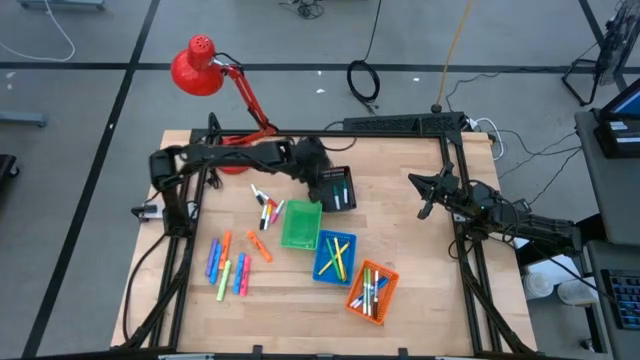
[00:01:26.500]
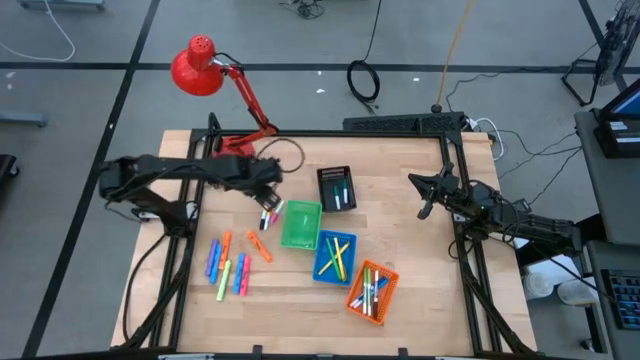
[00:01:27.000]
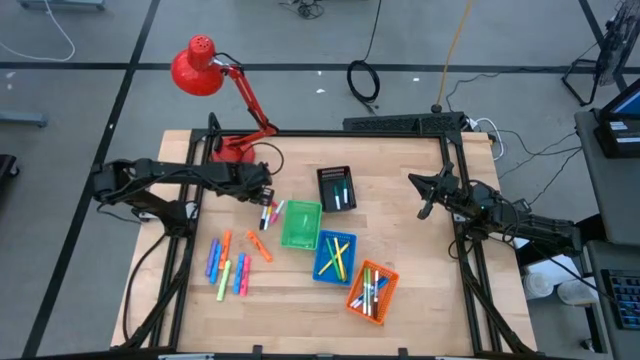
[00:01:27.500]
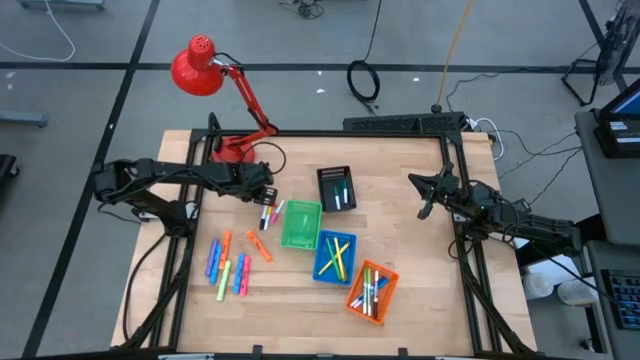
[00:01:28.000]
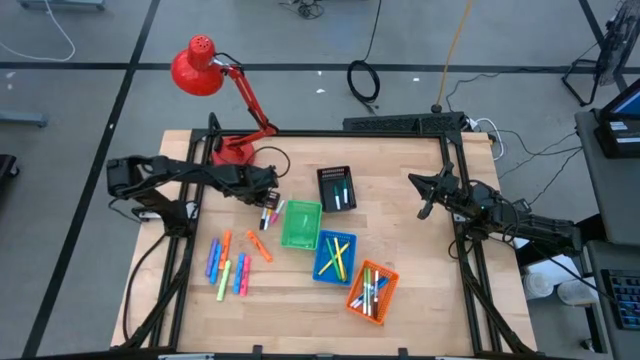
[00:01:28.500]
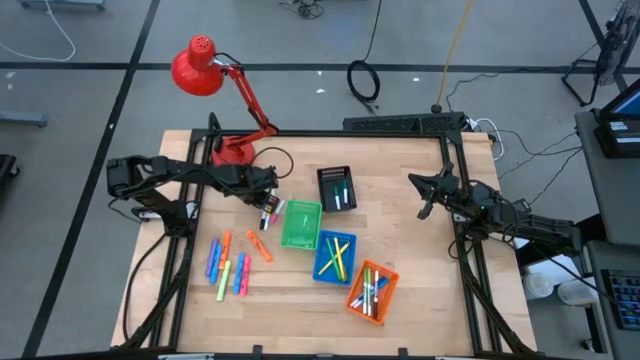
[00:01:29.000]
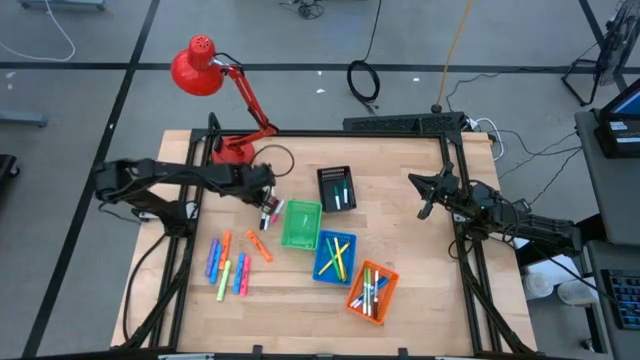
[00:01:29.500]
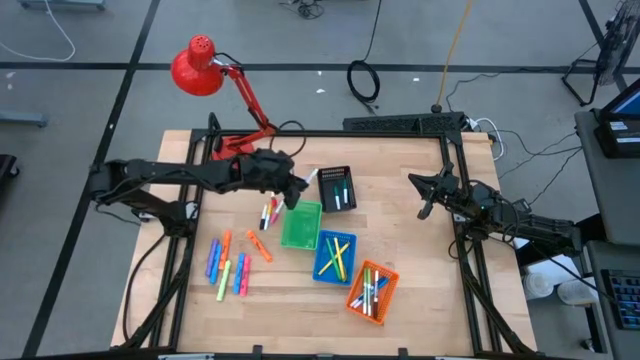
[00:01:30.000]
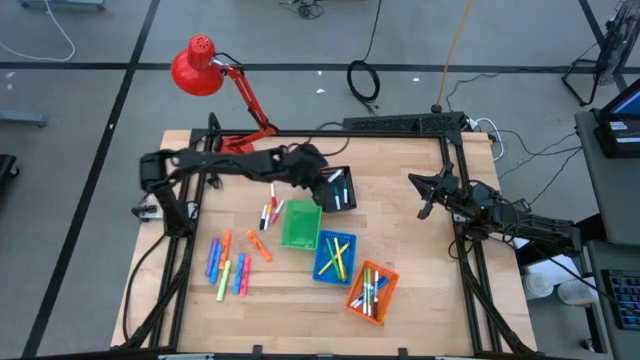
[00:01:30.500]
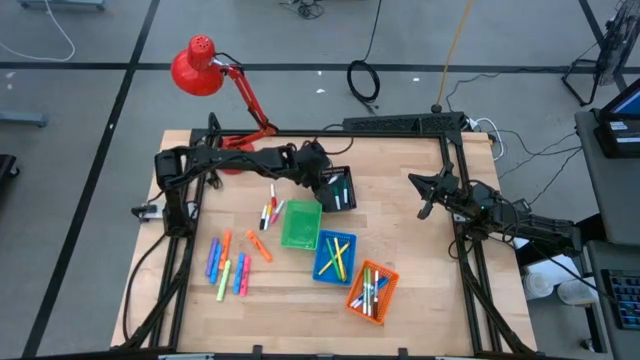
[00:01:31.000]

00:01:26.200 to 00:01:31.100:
Task: Pick & Place Markers
Put the top black and white highlighter pen into the black basket

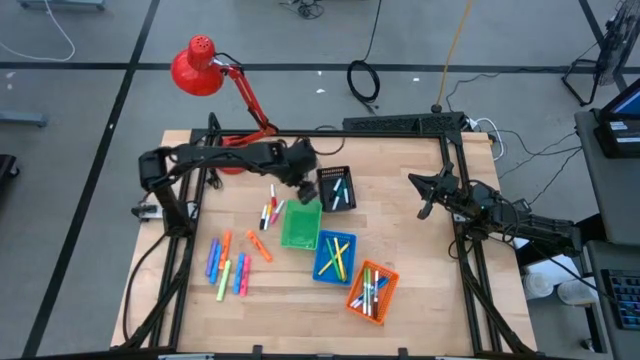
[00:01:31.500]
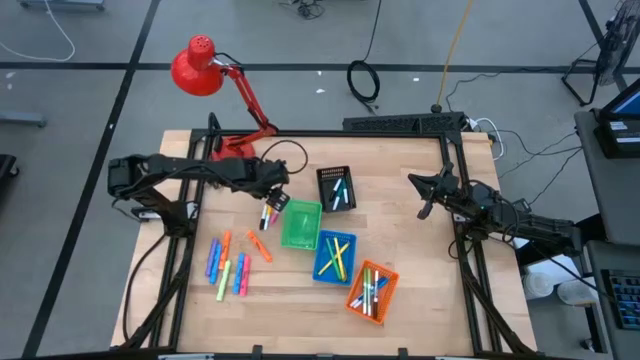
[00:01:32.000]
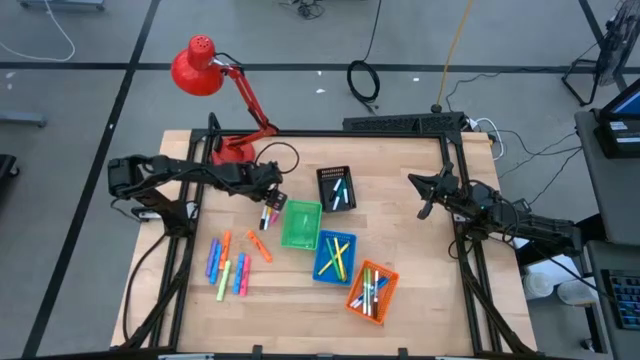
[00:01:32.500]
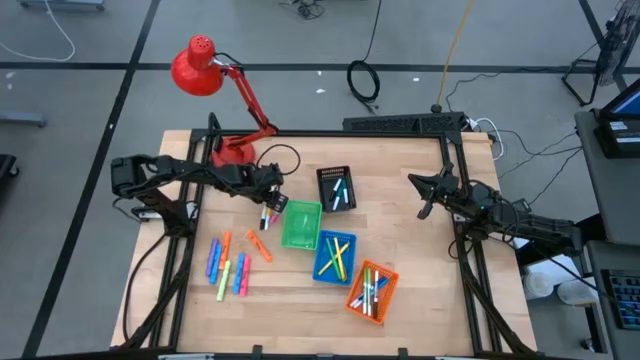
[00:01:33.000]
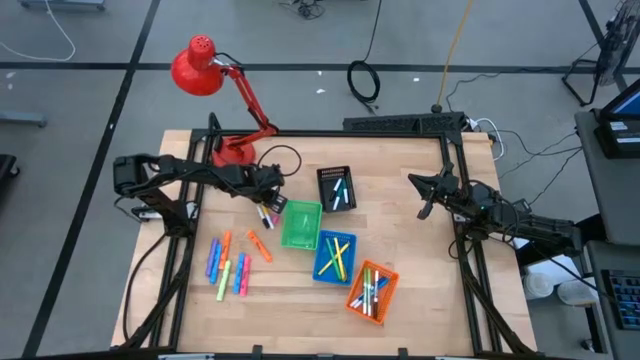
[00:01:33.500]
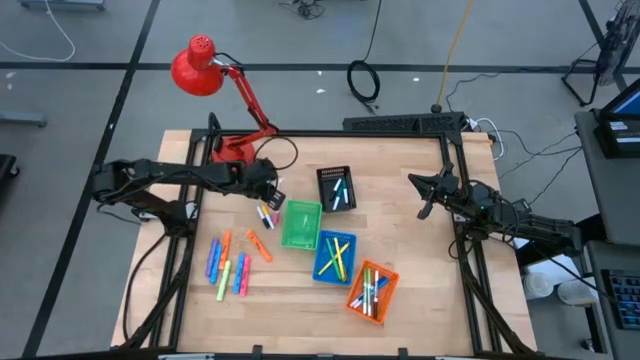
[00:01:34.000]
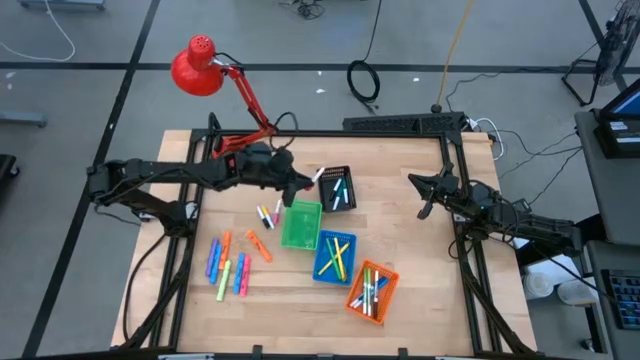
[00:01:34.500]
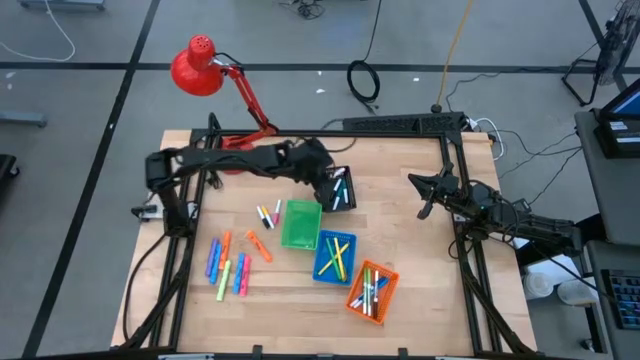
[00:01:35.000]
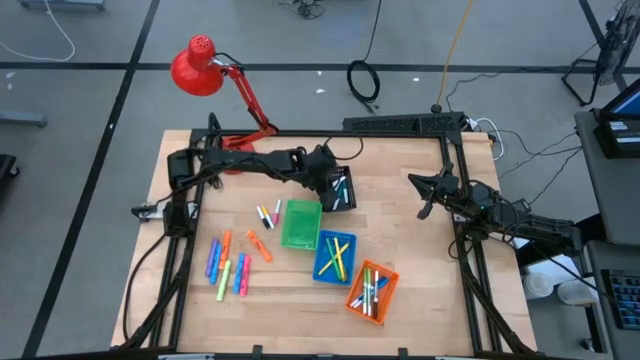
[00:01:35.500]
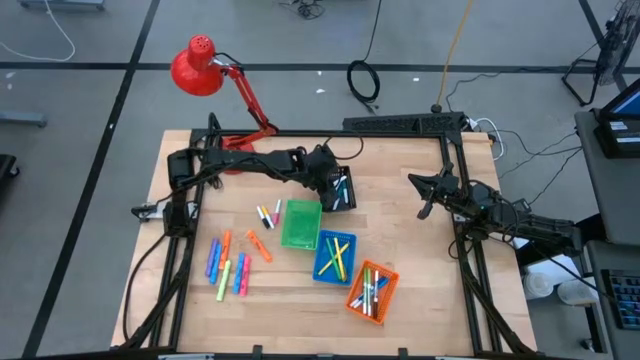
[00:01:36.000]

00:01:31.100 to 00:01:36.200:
Put the red and white highlighter pen into the black basket

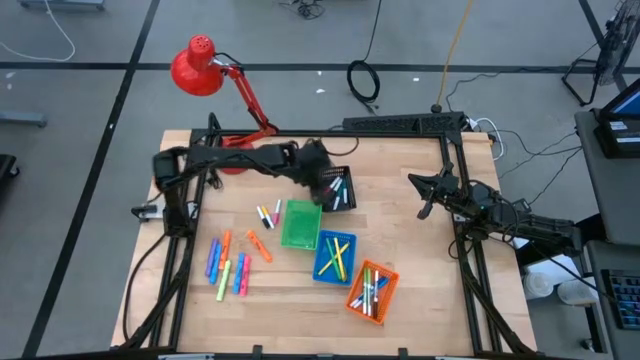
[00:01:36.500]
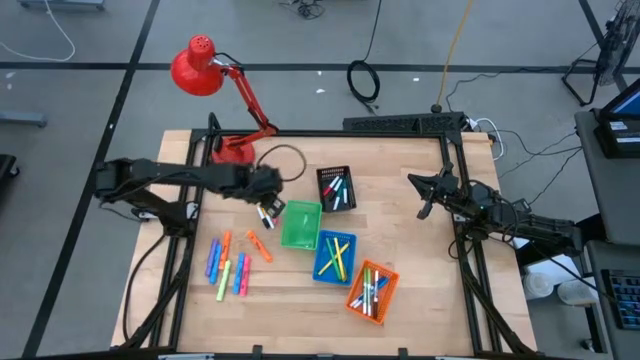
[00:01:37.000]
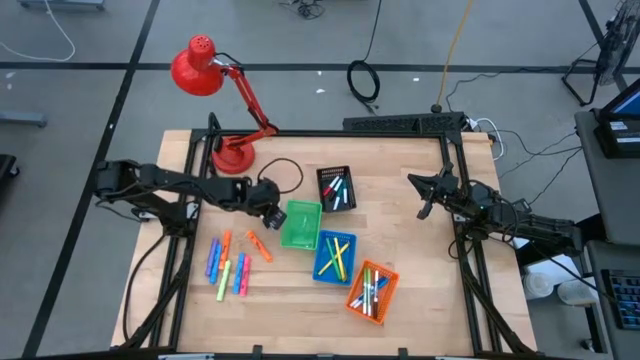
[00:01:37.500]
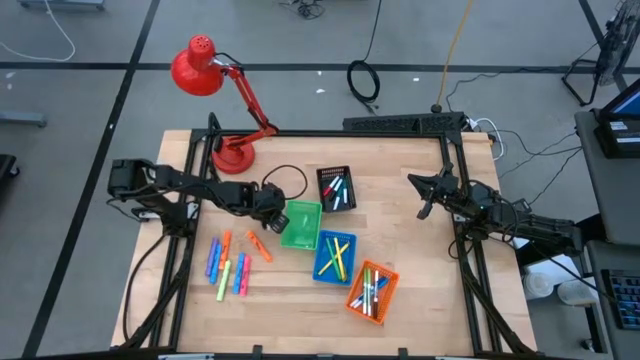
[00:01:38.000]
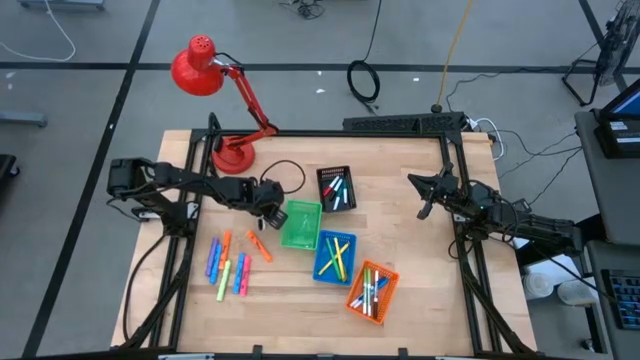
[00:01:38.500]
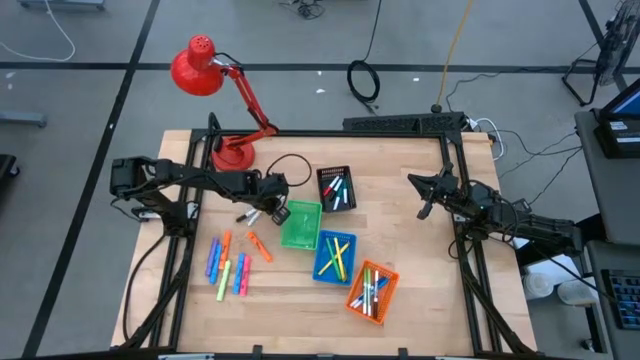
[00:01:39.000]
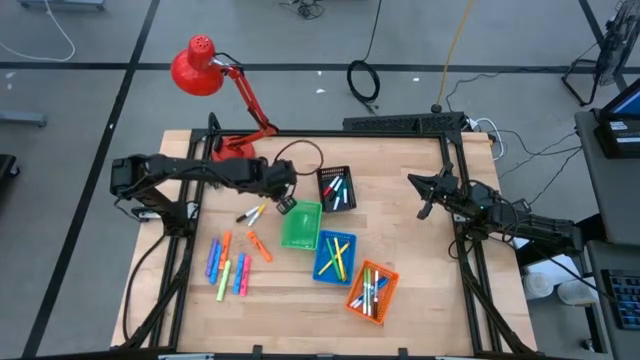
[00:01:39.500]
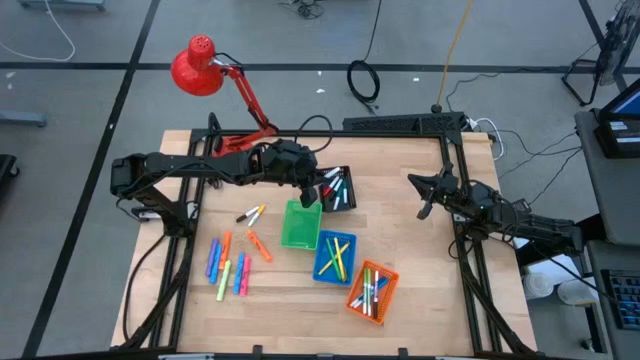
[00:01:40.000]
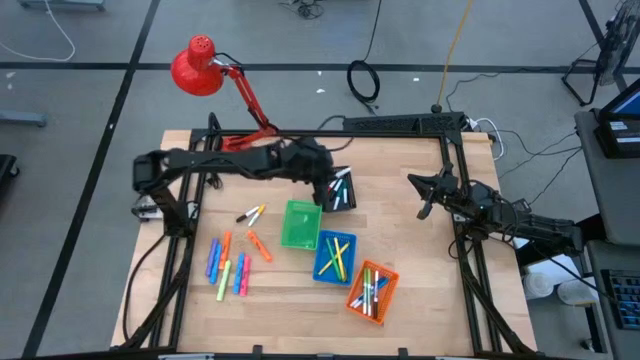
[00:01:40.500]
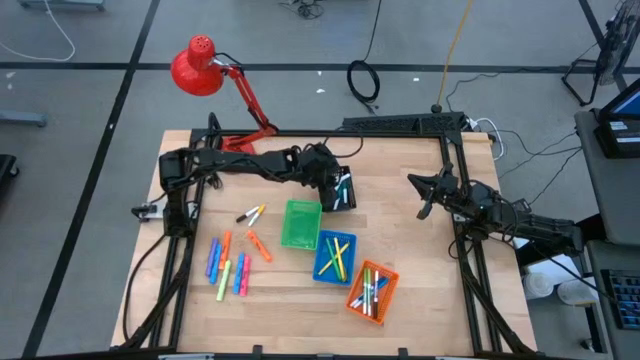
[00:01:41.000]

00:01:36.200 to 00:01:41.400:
Put the pink and white highlighter pen into the black basket

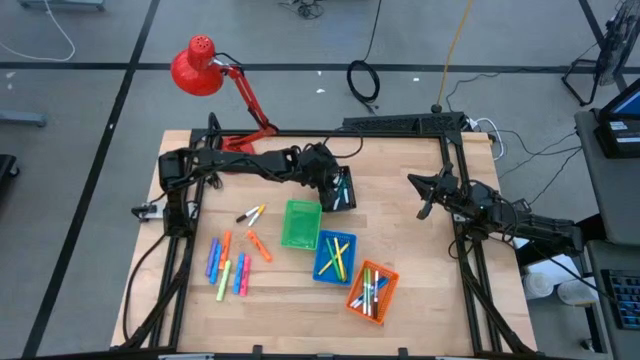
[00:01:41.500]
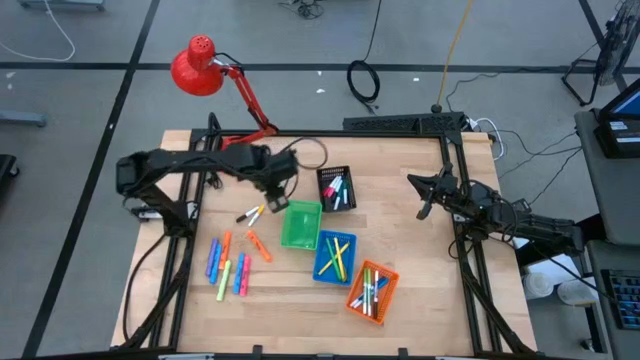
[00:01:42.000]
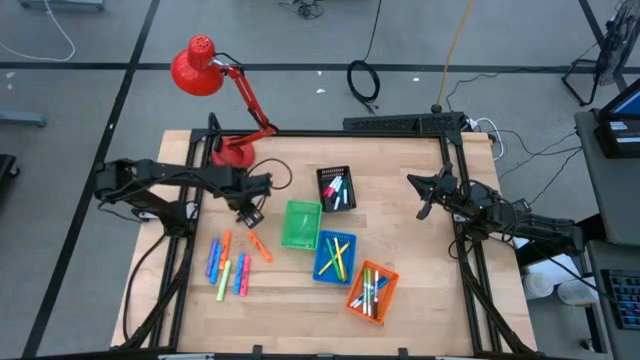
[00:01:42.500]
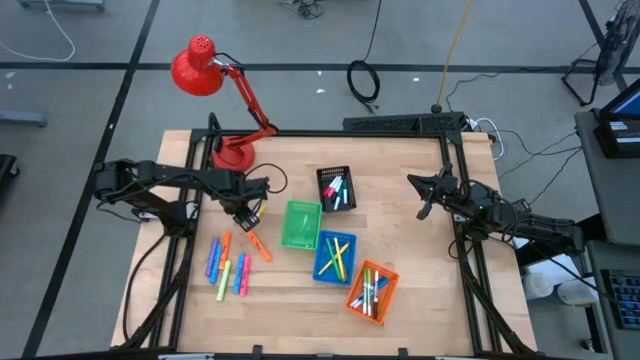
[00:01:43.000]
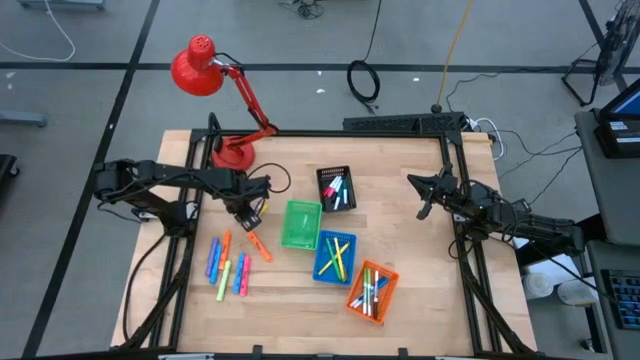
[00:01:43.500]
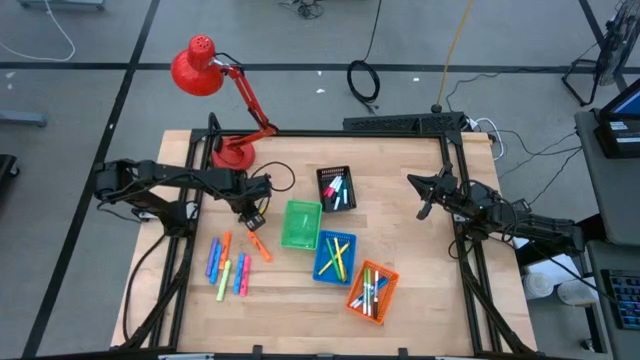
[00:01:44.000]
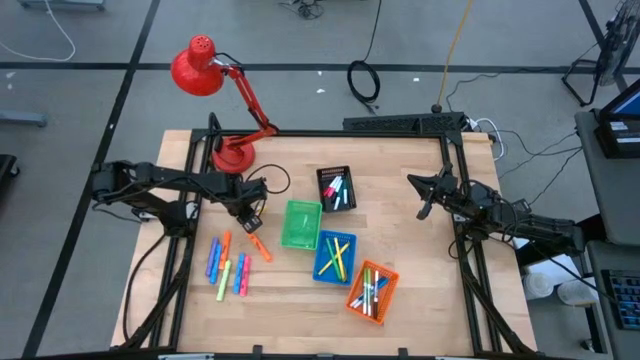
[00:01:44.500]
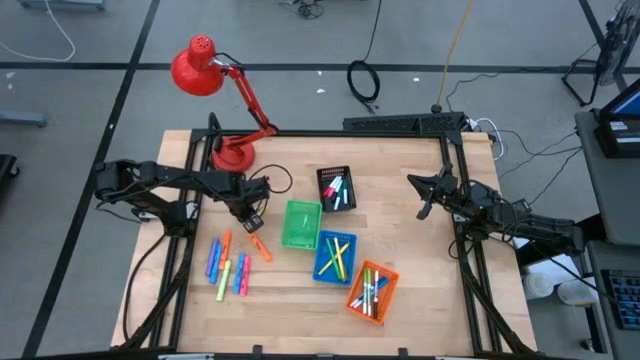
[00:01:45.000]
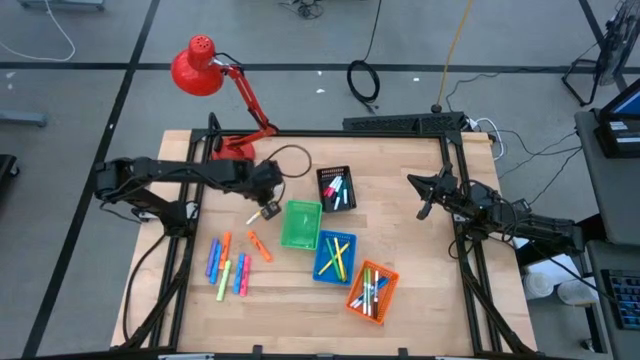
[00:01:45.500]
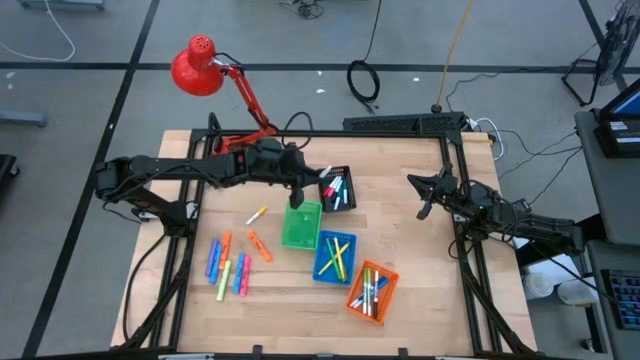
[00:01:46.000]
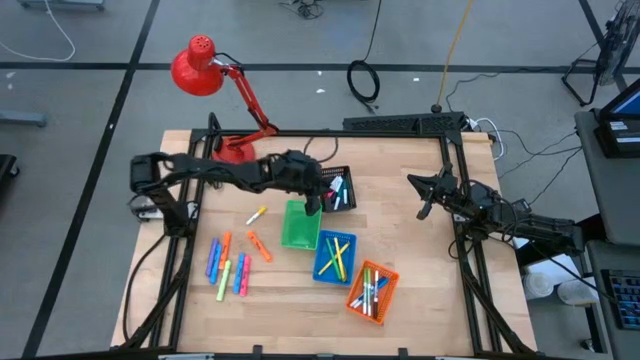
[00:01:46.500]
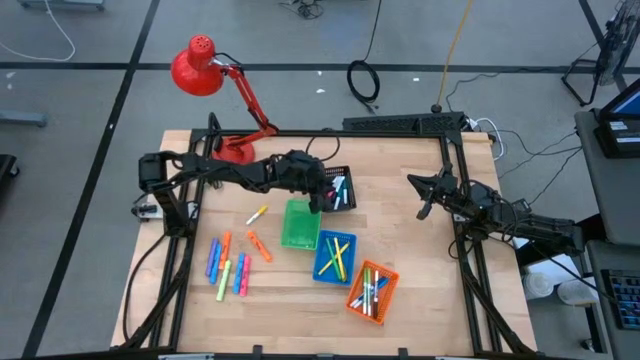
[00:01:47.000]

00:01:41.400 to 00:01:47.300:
Put the black and white highlighter pen into the black basket
